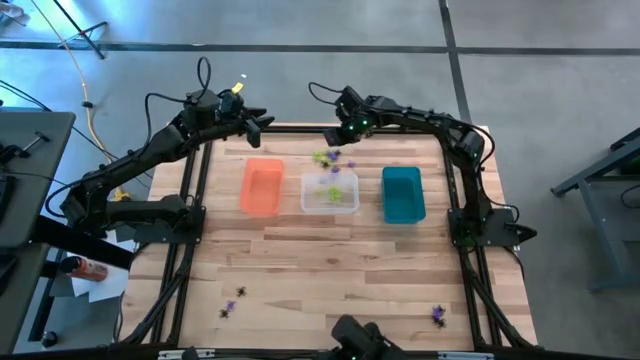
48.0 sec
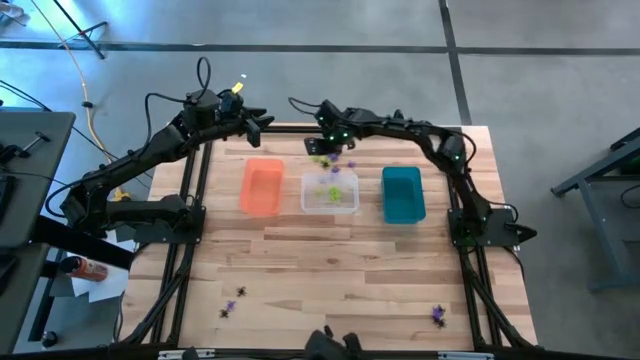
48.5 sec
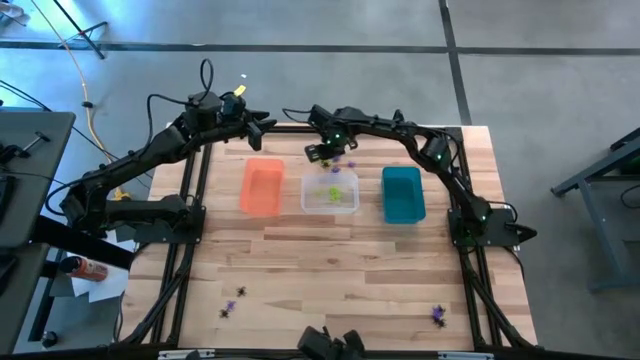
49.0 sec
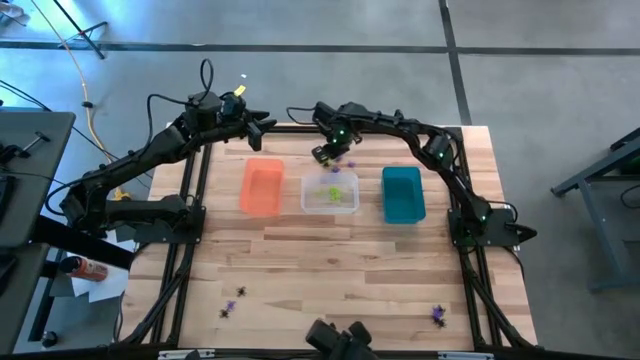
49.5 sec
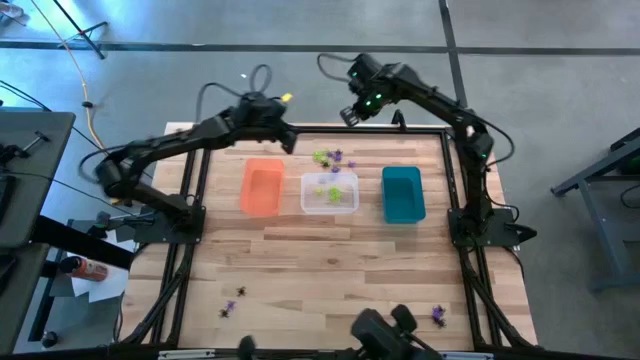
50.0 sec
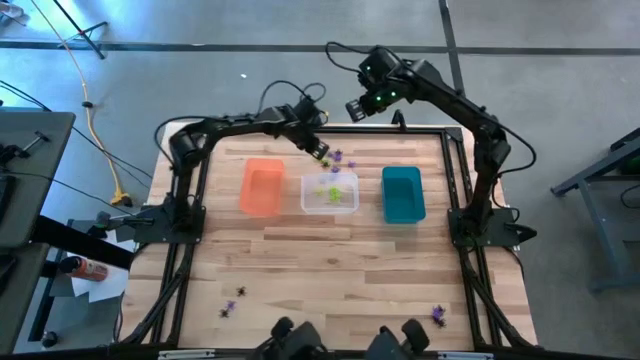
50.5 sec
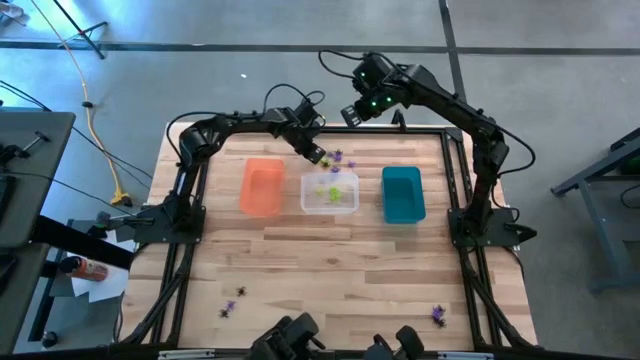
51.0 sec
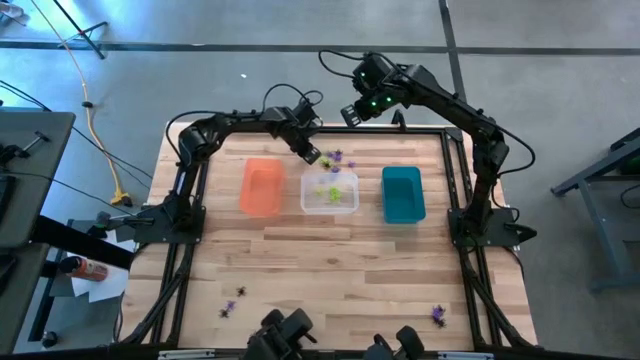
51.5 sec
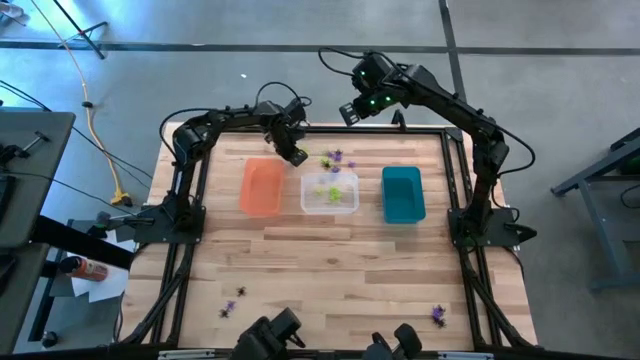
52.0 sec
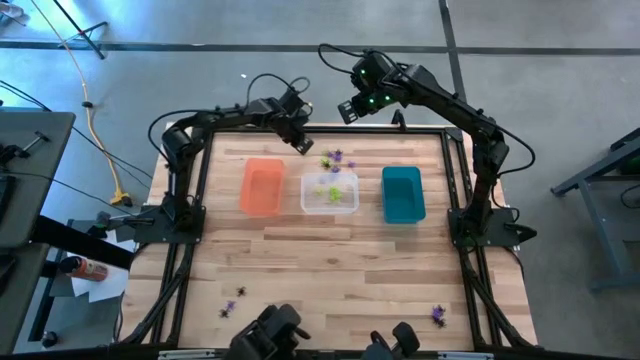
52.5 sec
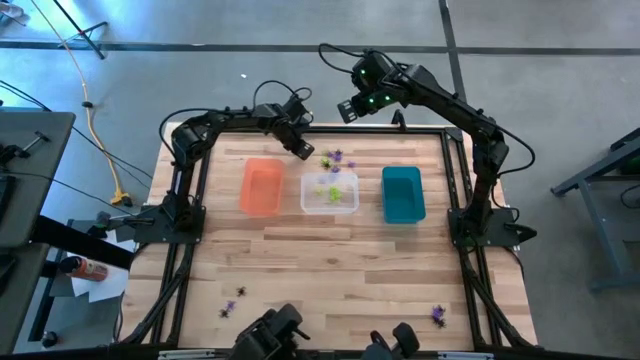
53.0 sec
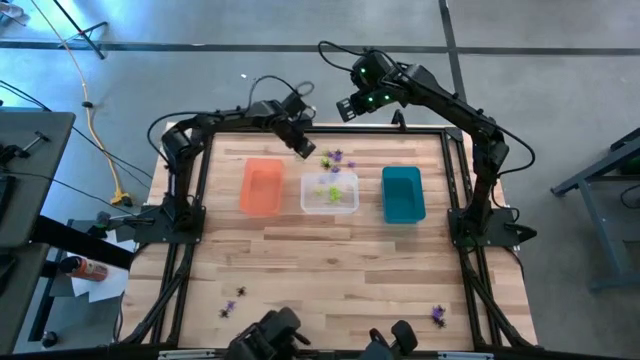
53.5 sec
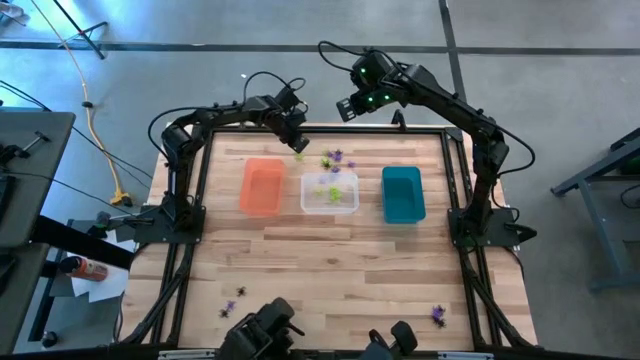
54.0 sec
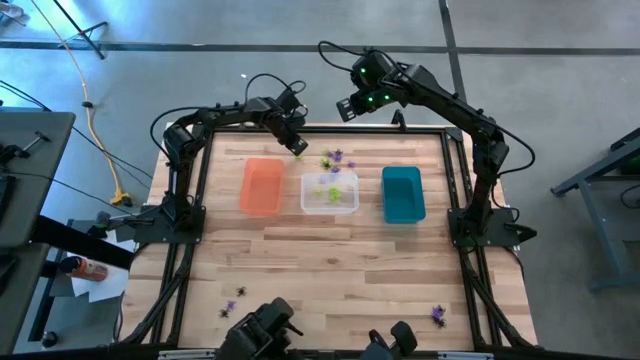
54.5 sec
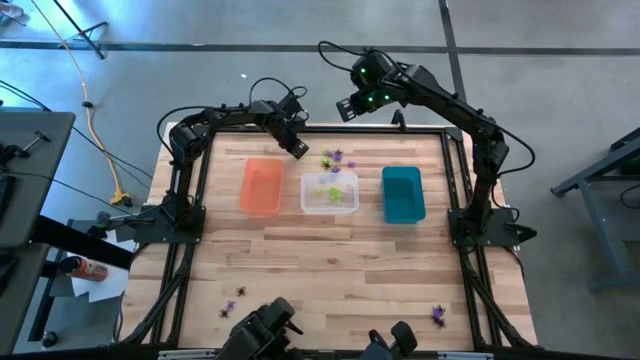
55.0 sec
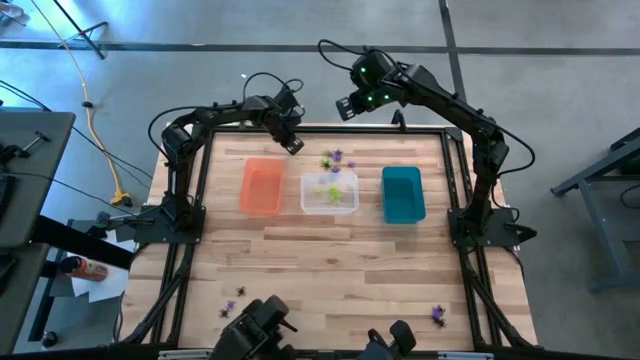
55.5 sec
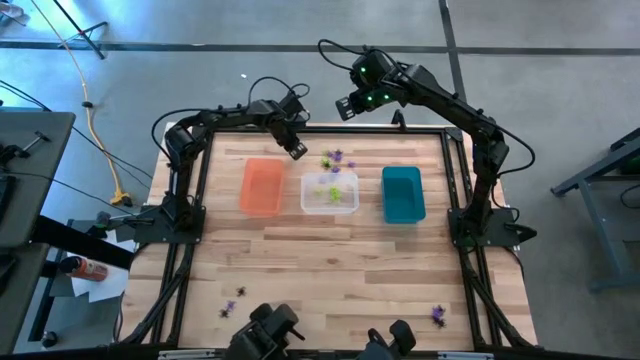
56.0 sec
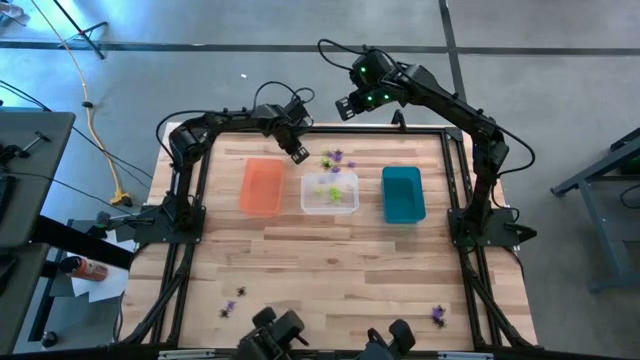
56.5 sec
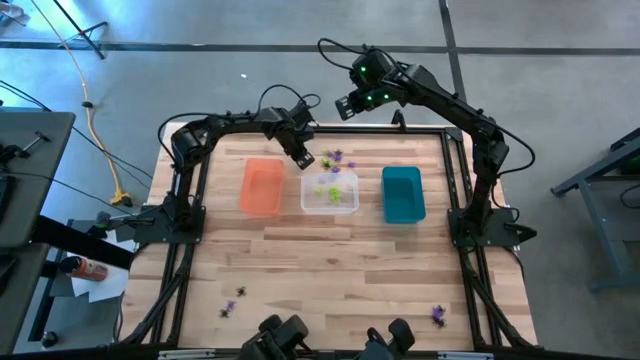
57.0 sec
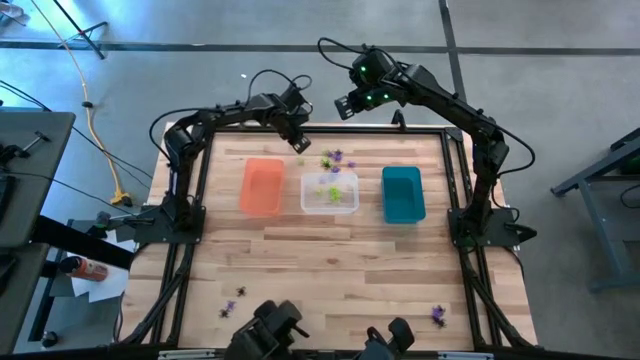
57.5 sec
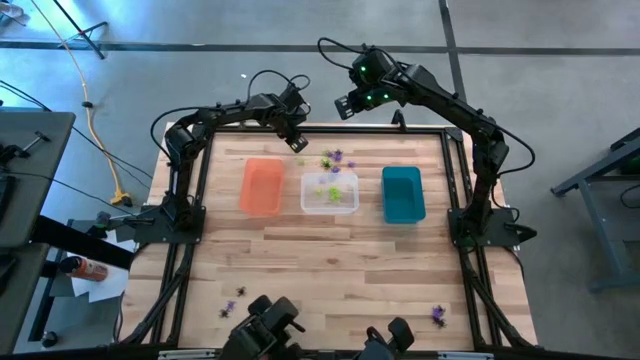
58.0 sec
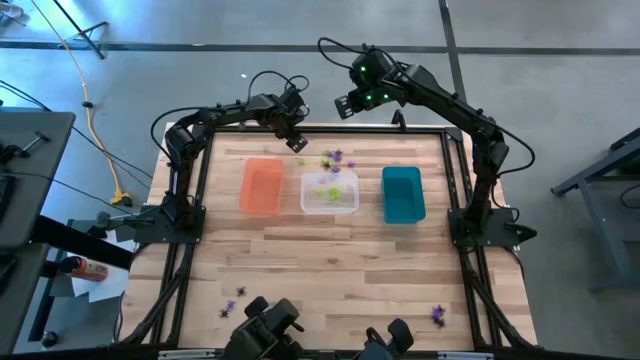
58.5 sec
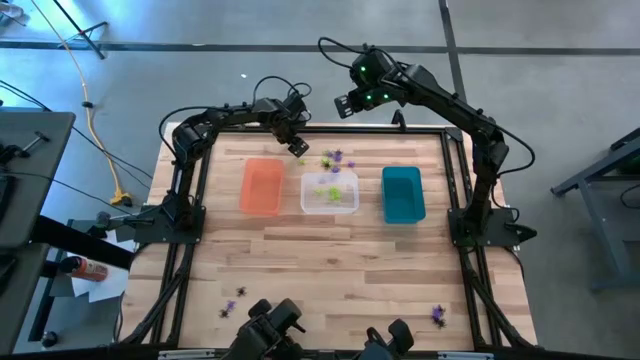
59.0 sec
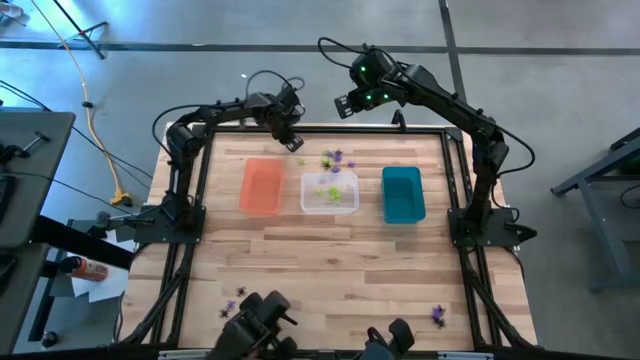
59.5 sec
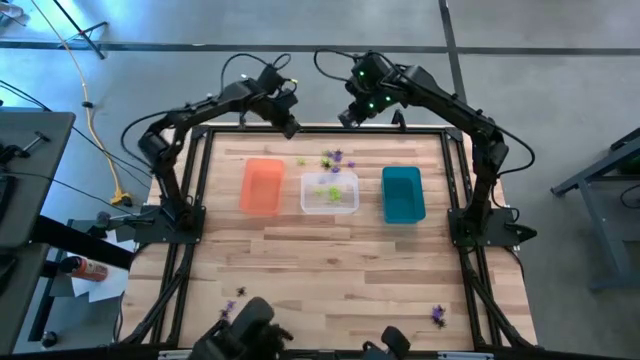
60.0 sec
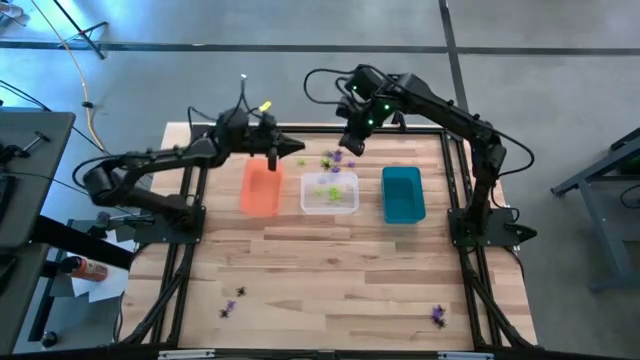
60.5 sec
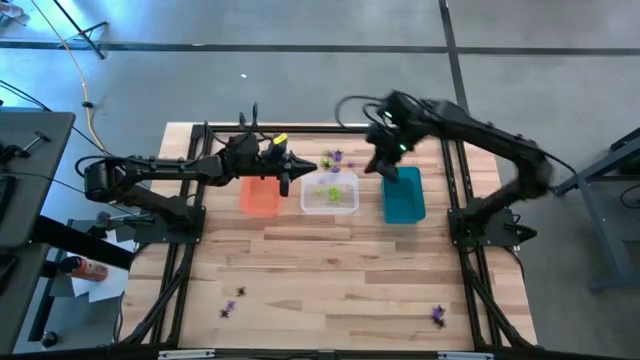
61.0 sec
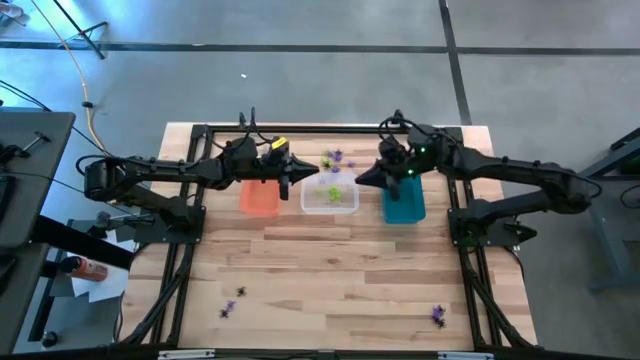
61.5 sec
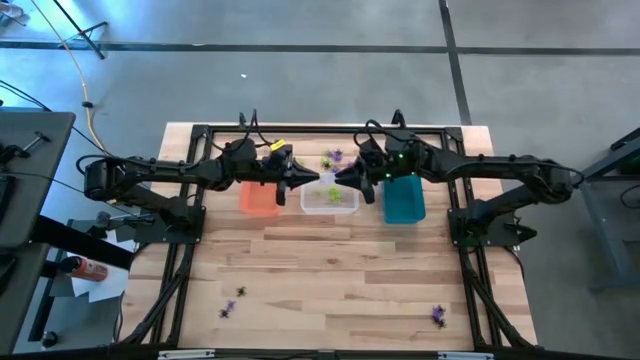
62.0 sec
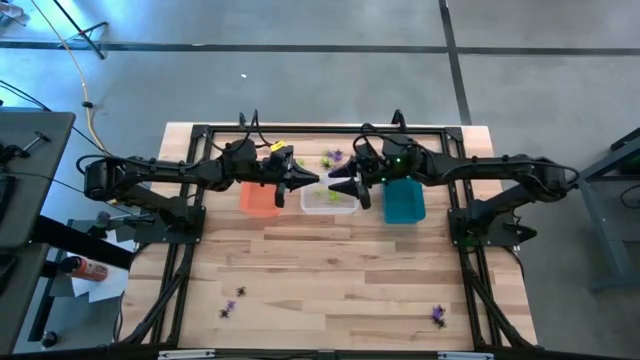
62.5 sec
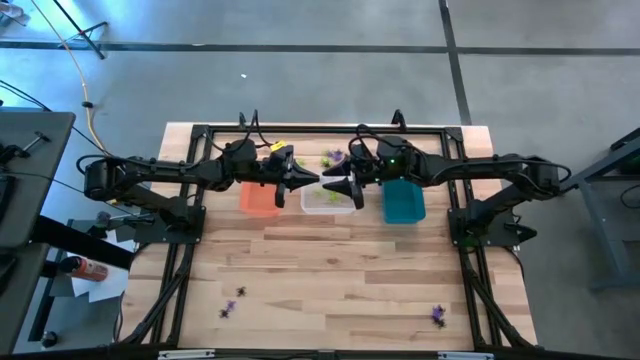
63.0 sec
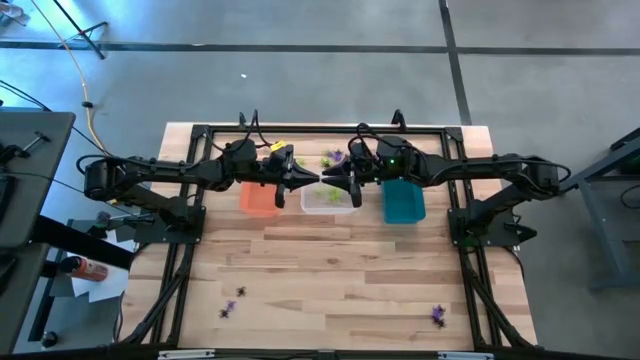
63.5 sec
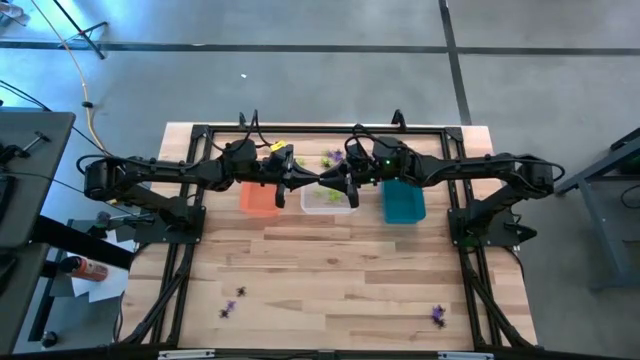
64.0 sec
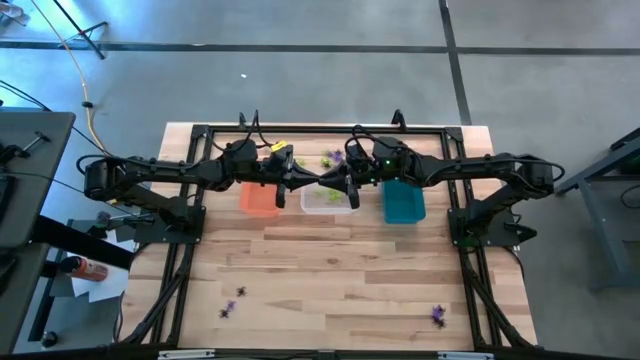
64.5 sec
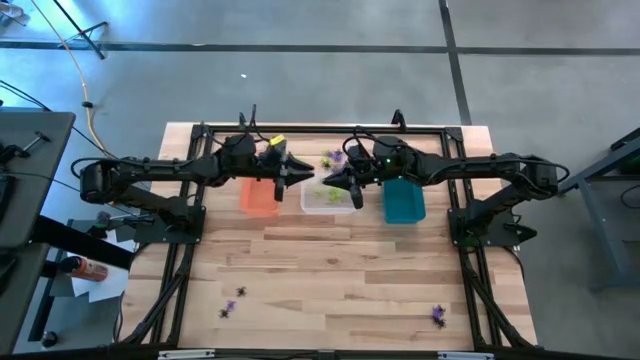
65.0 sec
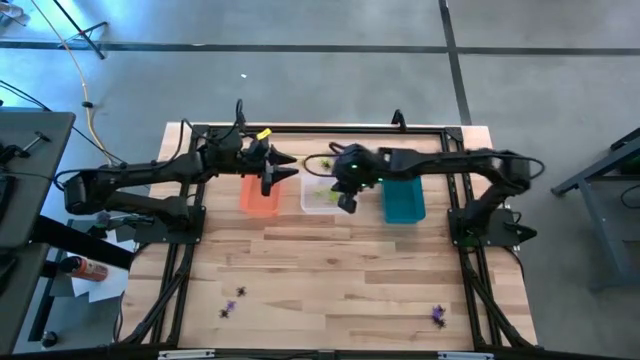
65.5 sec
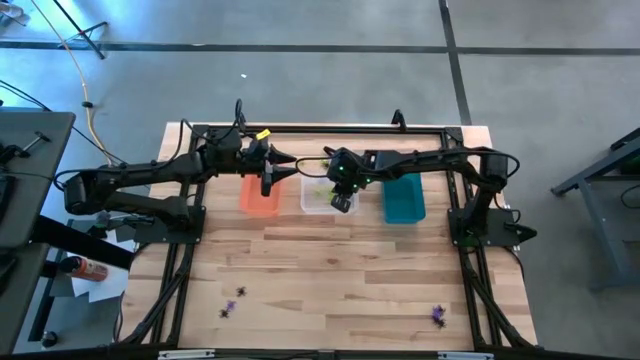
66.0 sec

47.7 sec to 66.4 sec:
Task: Sort Halloween decoration
Put the green spider toy into the transparent bin

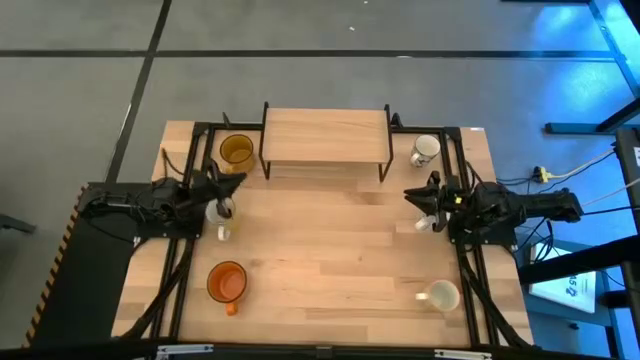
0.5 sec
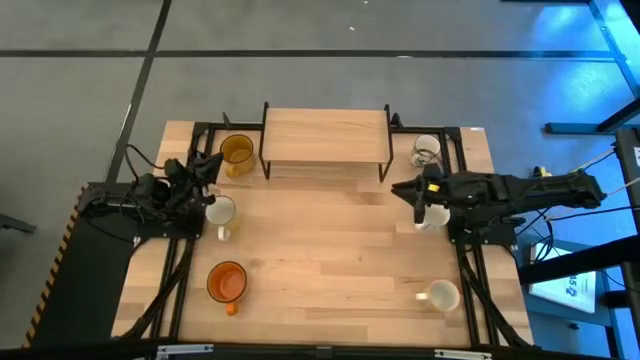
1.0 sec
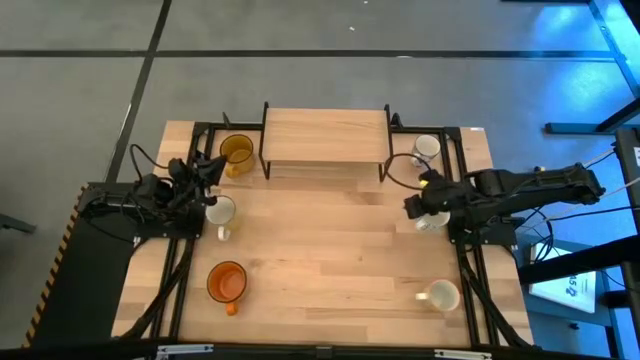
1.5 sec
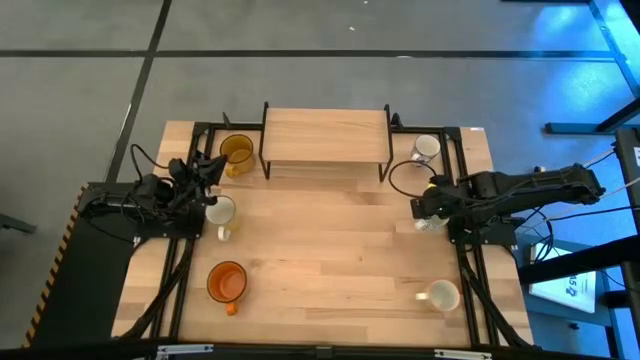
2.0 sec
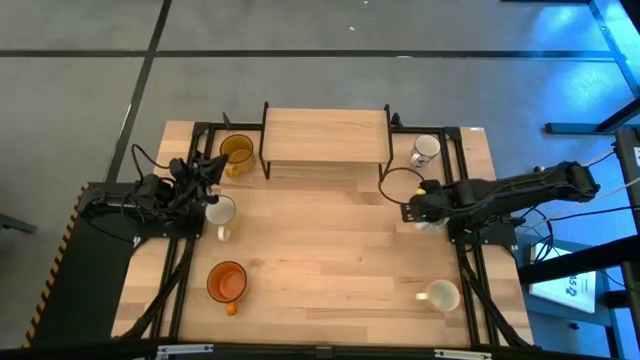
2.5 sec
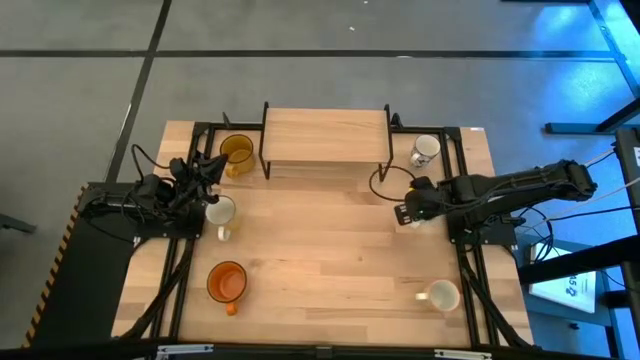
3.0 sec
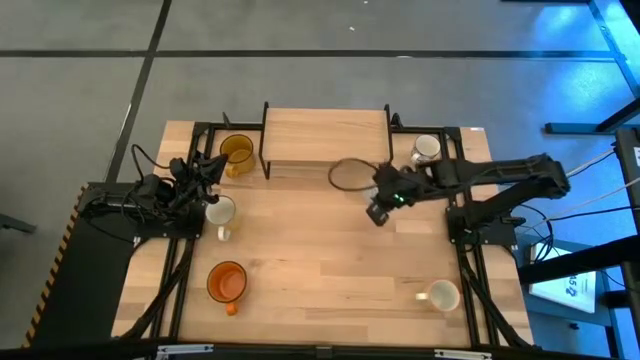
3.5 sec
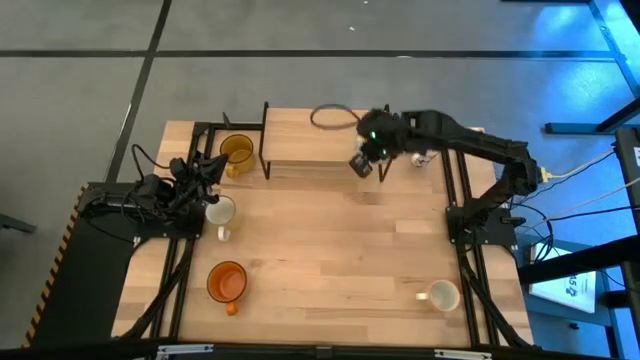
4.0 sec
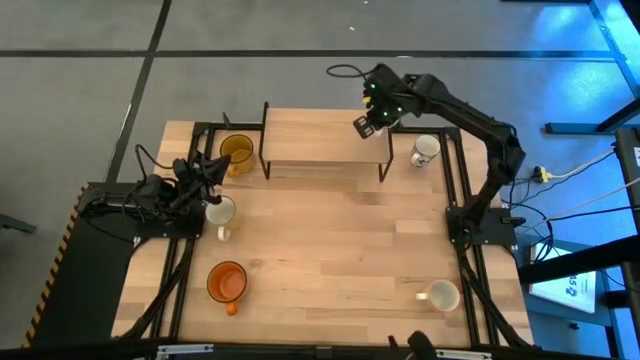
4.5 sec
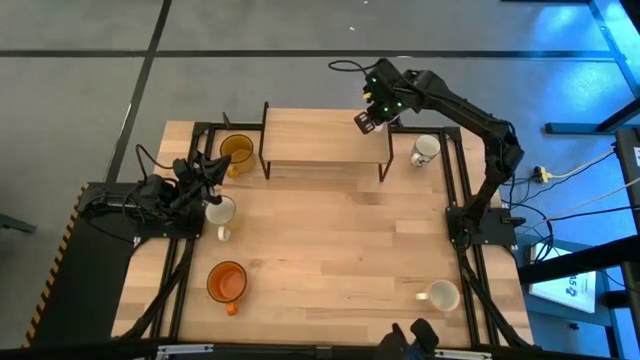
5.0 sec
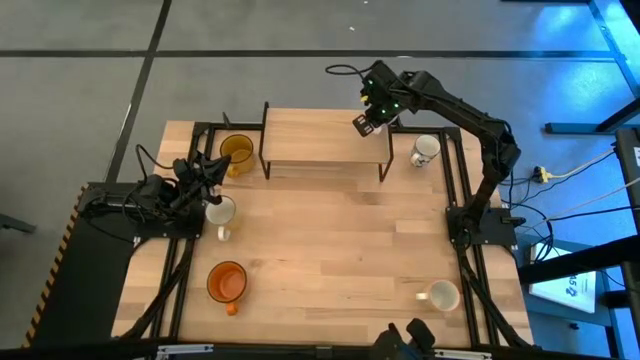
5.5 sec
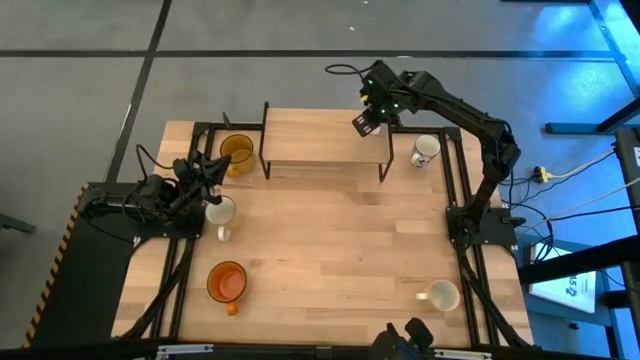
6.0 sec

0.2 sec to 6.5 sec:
Task: Place coffee mugs
Put the bottom blue patterned mug on the shelf
